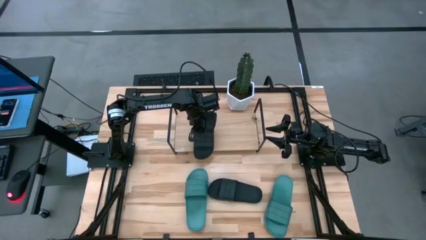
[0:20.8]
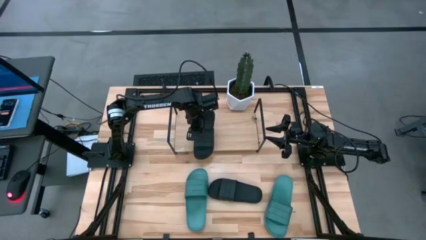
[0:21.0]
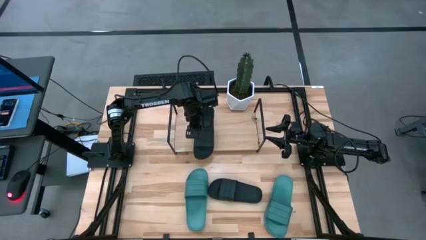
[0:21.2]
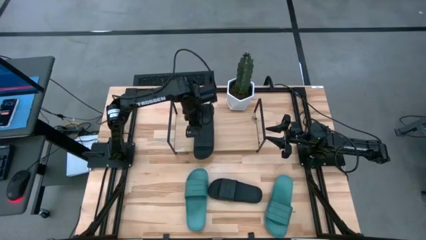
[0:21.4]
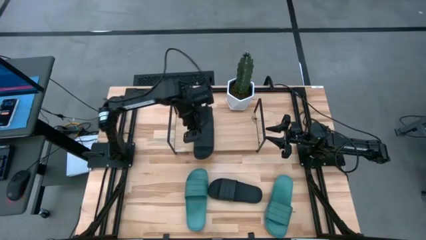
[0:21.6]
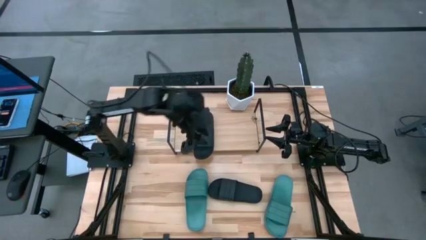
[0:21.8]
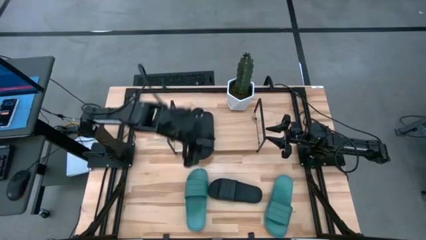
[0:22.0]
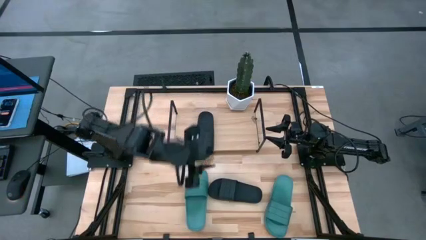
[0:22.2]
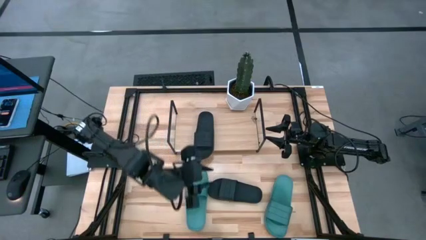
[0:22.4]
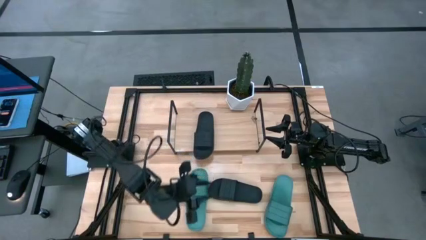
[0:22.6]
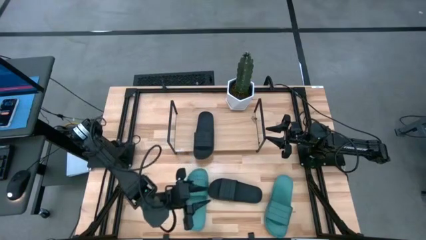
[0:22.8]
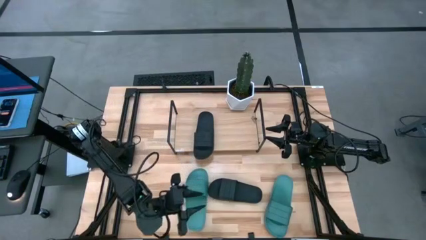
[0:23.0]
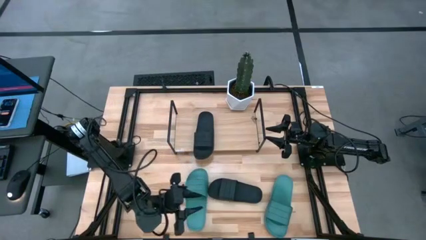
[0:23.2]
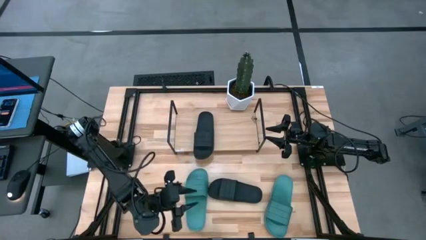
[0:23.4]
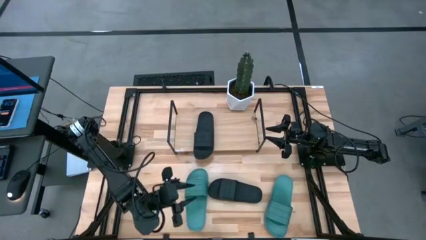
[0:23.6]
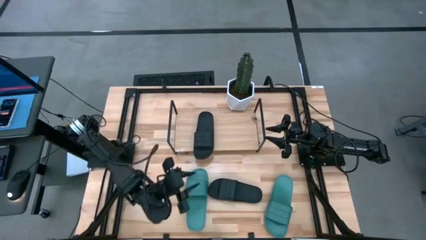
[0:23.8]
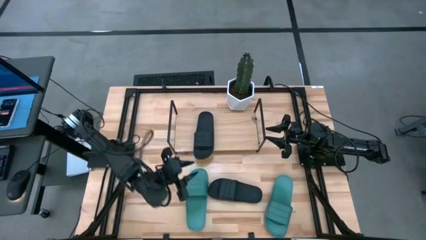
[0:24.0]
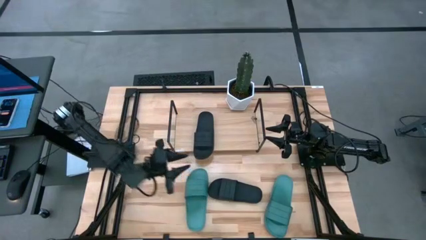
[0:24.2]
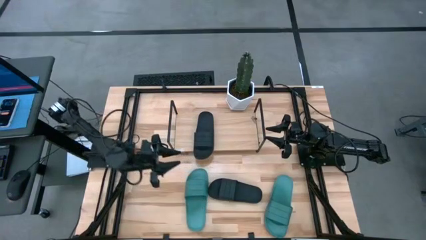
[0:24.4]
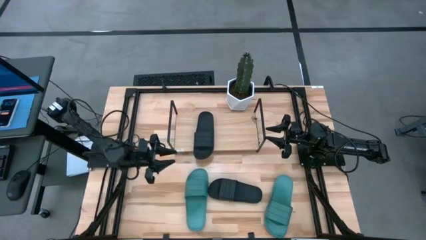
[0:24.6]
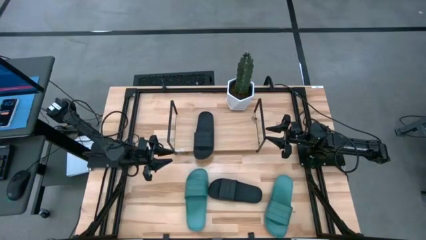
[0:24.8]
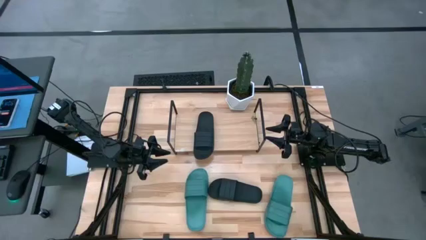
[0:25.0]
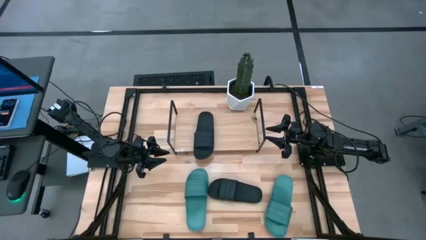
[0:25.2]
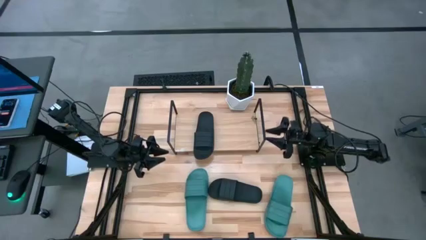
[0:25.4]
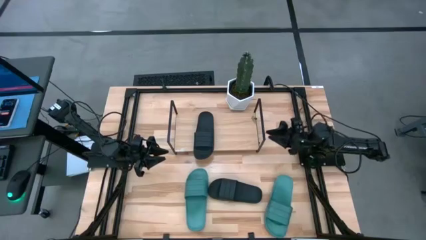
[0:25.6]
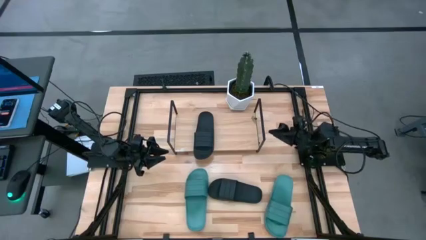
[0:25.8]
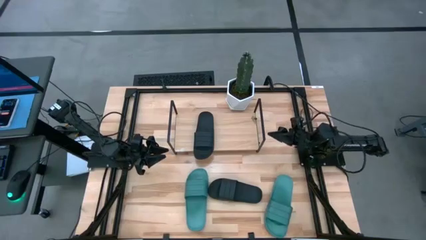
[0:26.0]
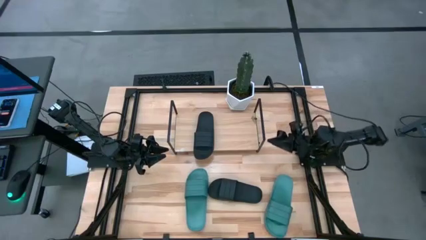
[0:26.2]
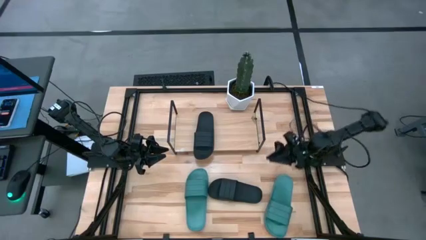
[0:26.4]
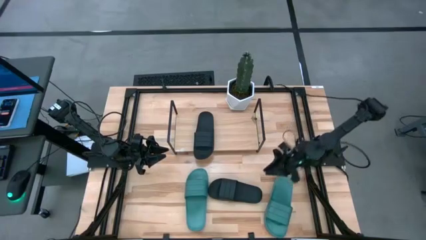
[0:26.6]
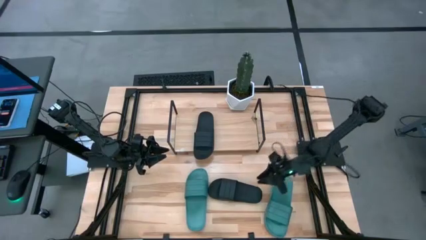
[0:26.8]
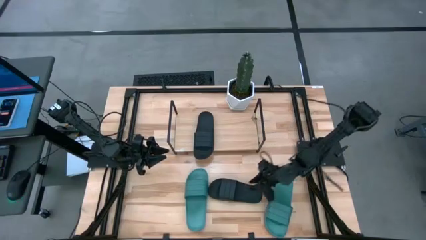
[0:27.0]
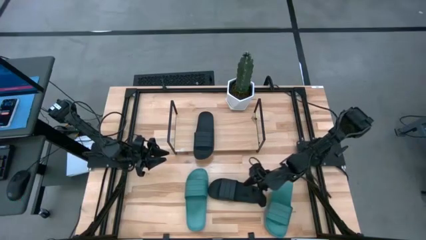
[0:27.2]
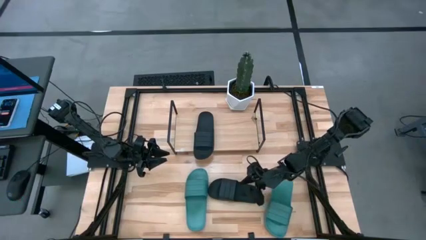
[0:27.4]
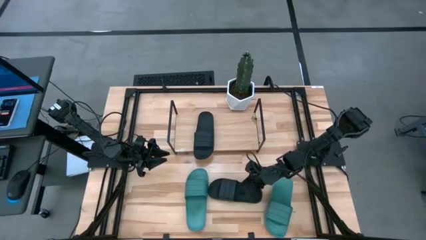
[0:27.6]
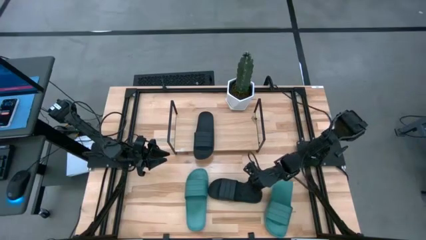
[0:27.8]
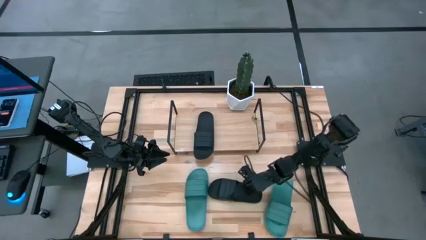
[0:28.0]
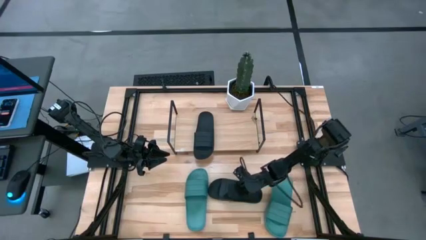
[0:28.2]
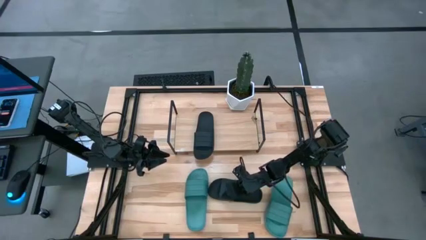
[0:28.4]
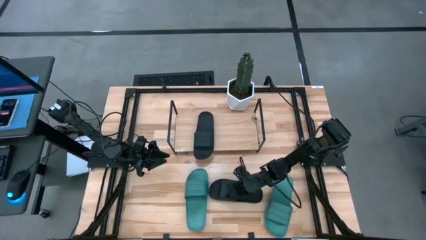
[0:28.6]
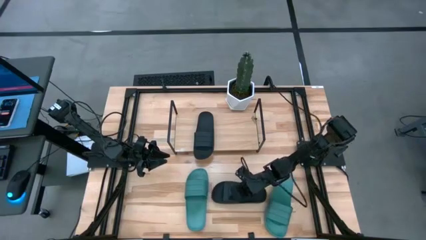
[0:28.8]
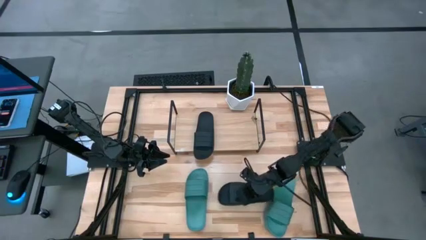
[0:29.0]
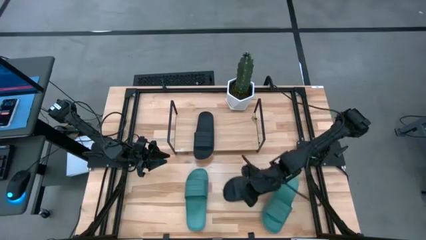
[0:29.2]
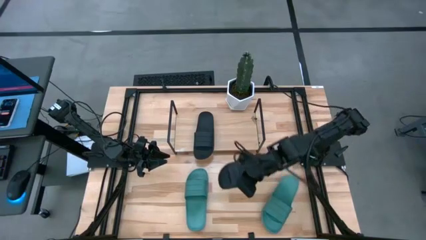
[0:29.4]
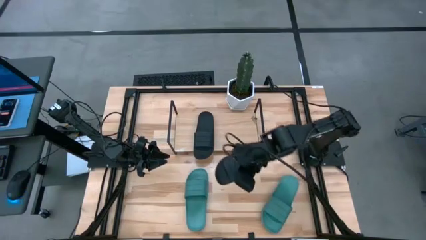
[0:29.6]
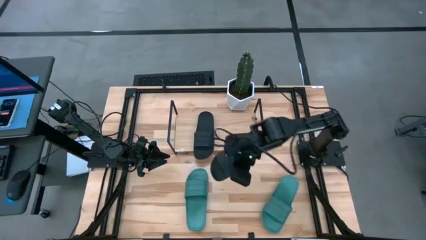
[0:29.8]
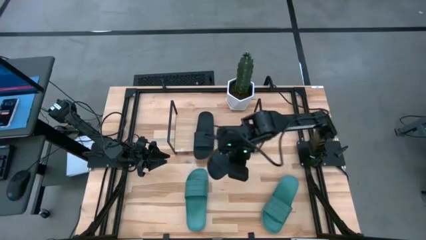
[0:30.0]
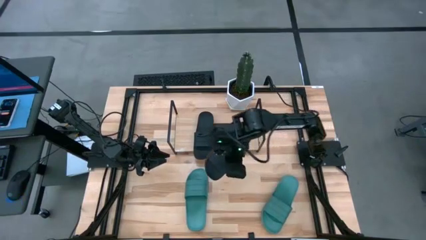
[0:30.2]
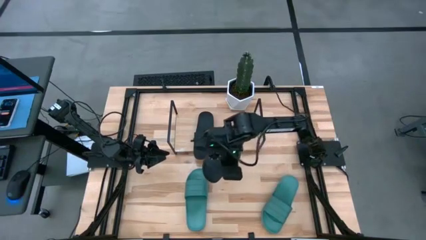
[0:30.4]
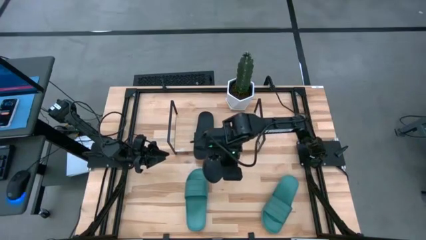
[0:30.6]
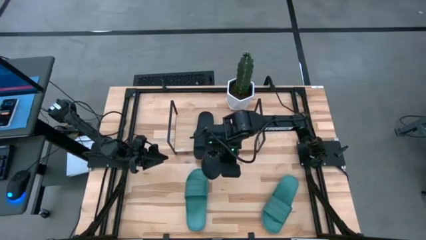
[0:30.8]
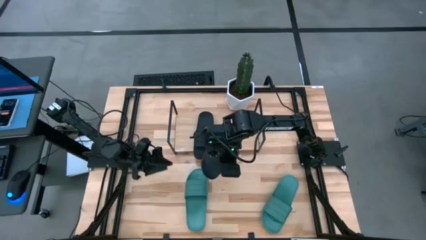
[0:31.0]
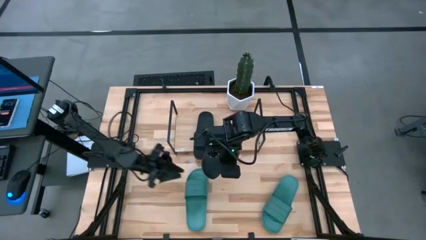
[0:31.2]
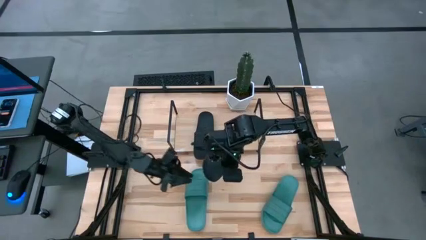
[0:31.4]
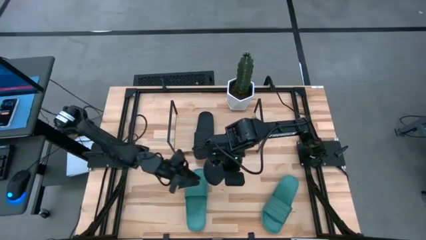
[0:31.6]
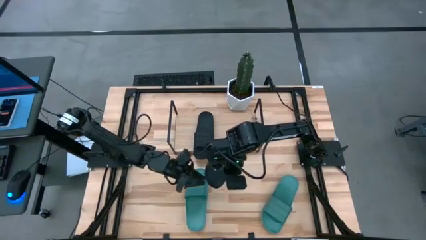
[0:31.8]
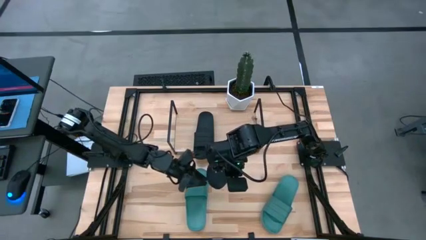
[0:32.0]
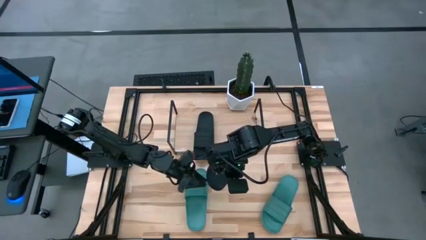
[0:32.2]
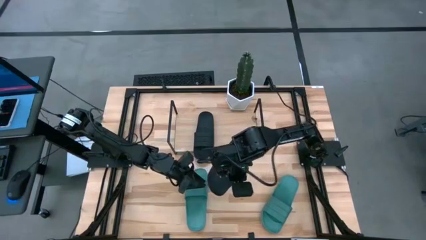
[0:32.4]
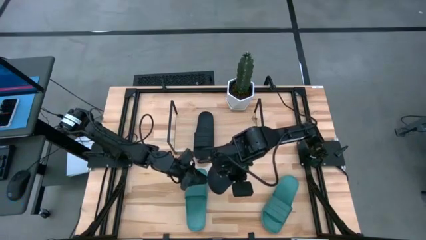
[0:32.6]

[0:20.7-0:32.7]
Task: Pick and place slides into the shelf
Put the black slipper on the shelf

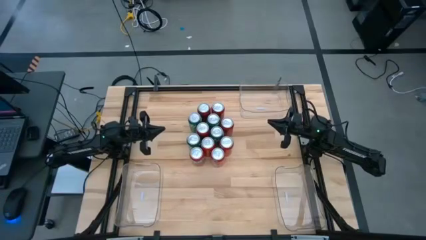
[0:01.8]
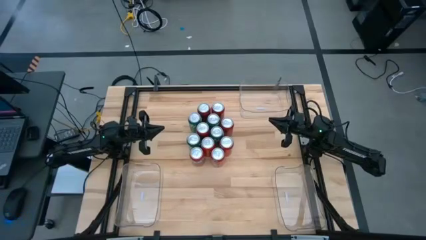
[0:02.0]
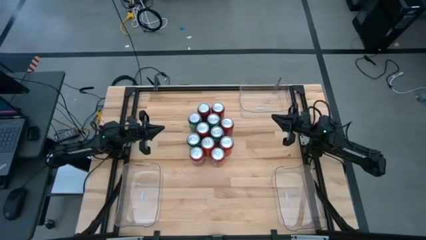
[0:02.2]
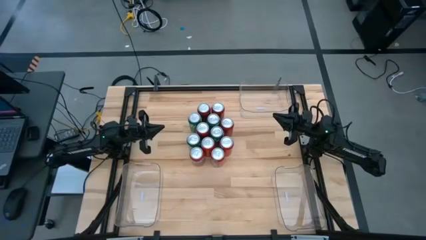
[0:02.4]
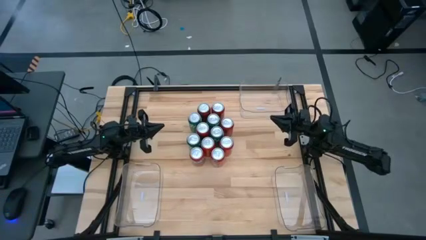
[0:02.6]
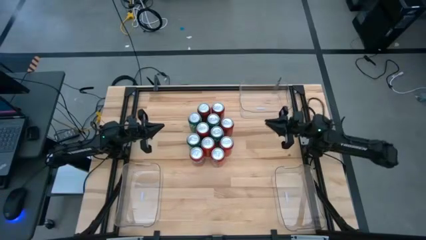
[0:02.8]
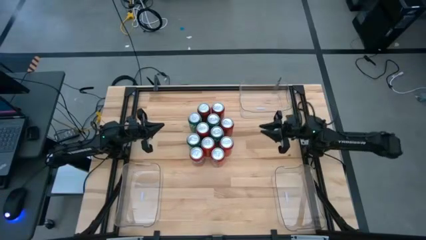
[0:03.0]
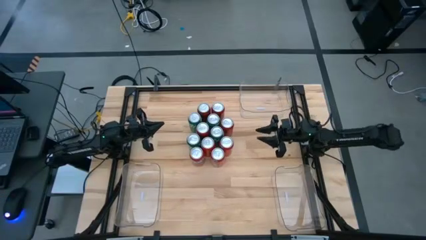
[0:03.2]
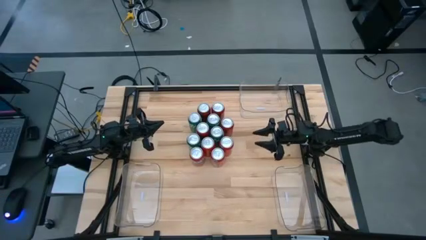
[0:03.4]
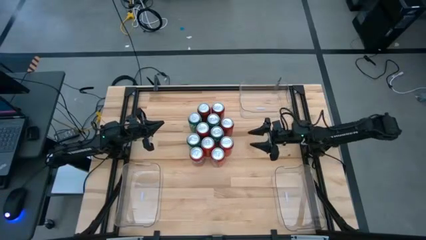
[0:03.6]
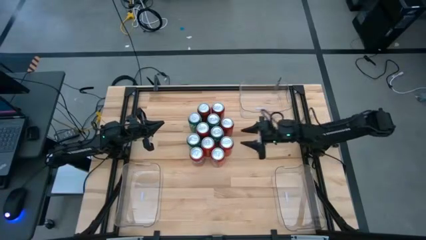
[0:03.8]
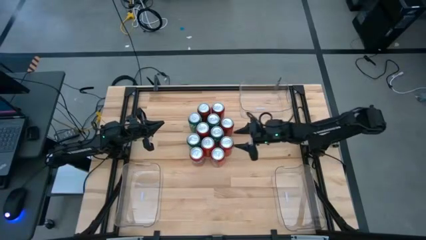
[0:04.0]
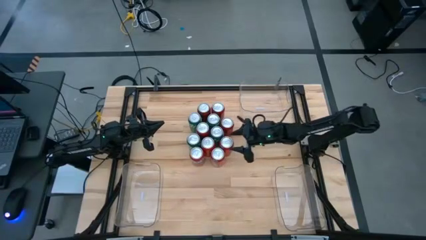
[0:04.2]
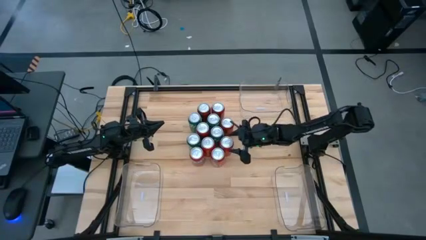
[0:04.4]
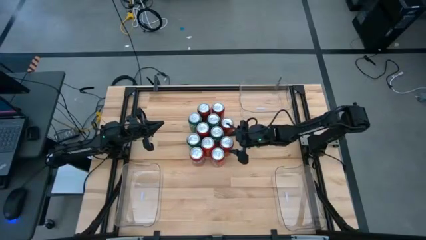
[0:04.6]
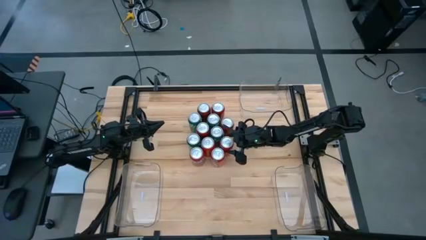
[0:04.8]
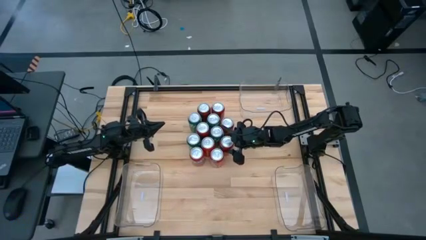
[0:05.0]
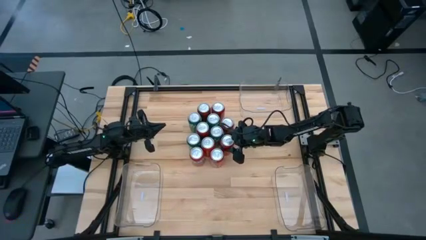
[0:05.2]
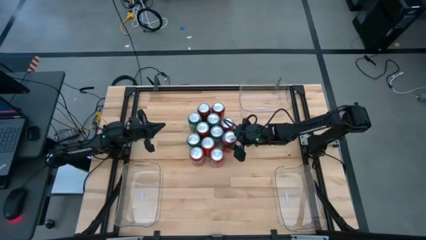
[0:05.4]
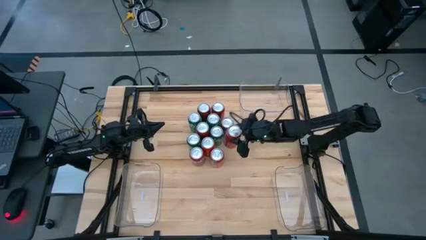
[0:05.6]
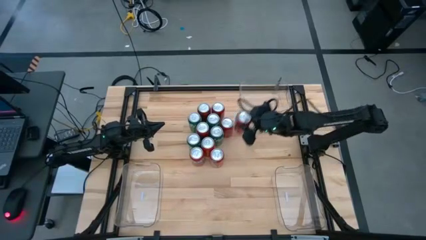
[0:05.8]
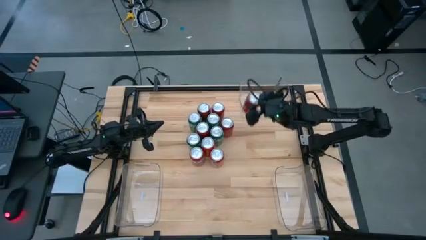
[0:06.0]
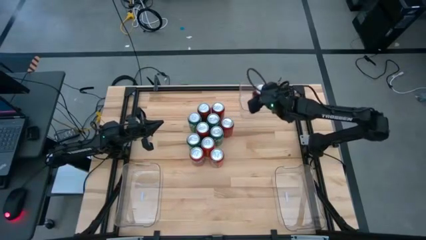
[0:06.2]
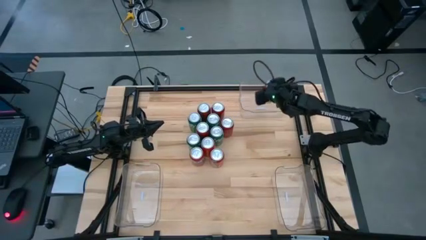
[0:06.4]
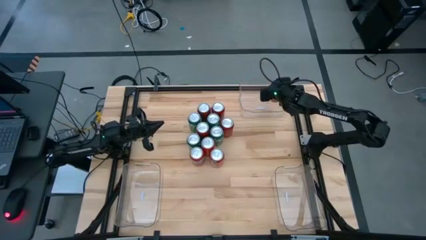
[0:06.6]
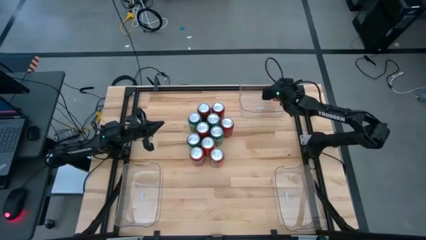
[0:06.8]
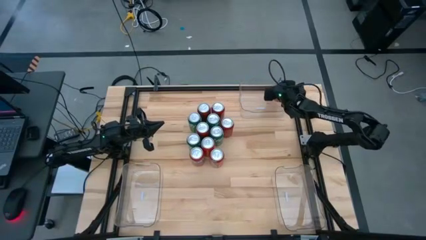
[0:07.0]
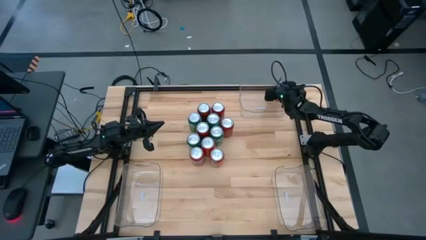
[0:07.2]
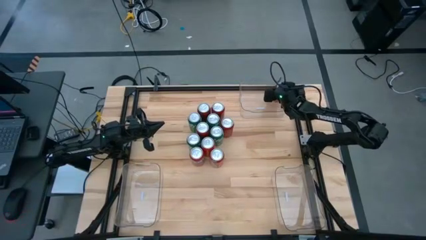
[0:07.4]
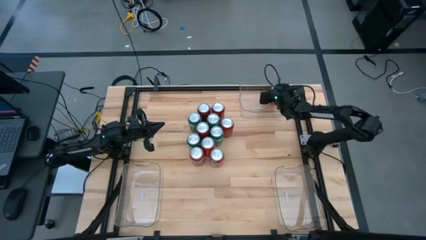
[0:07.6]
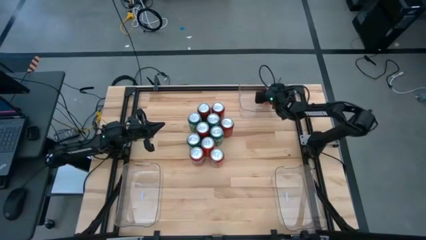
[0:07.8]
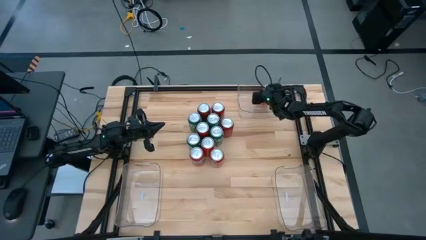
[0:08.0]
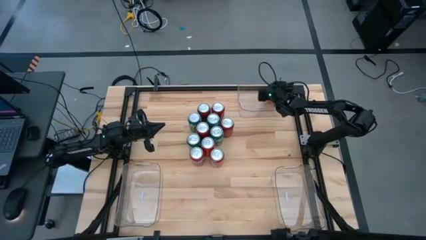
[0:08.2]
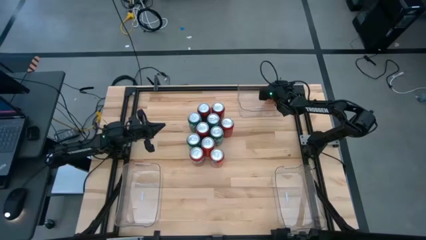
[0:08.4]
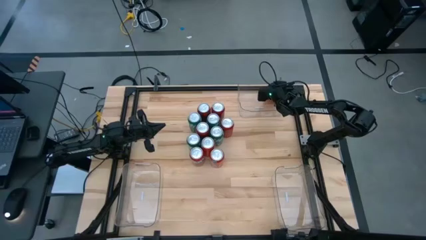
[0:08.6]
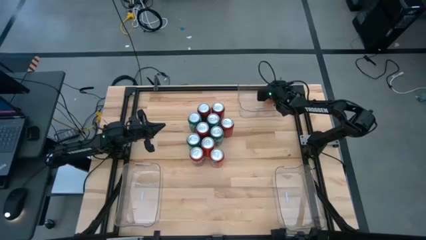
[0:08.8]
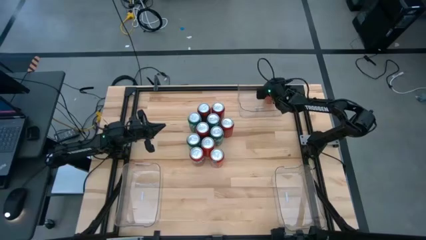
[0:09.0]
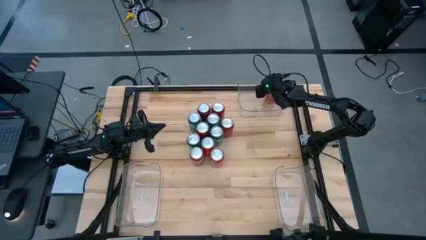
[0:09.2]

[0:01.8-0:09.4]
Task: Sort soda cans
Put the top right orange soda can into the top transparent bin
